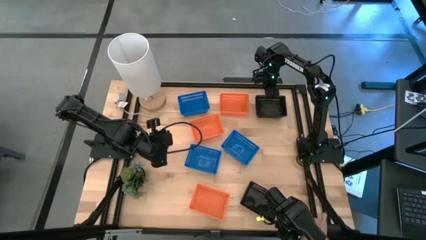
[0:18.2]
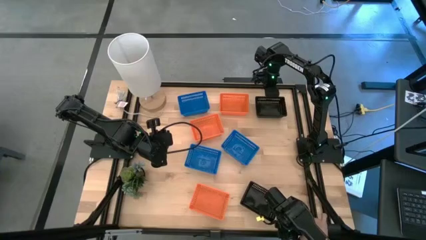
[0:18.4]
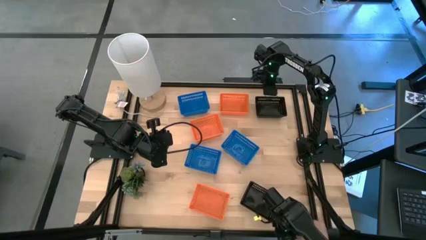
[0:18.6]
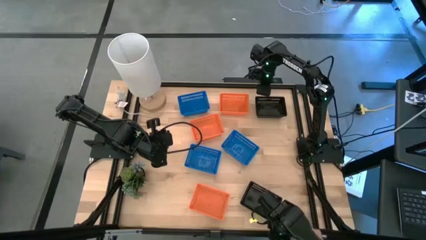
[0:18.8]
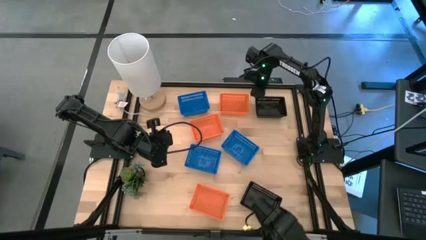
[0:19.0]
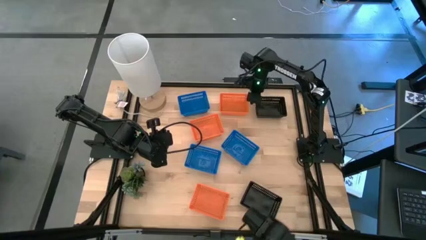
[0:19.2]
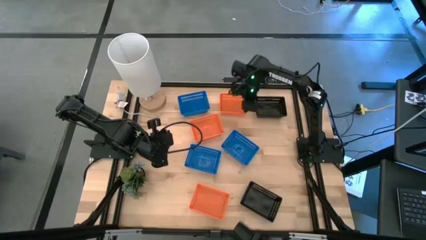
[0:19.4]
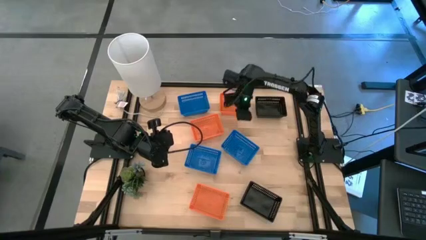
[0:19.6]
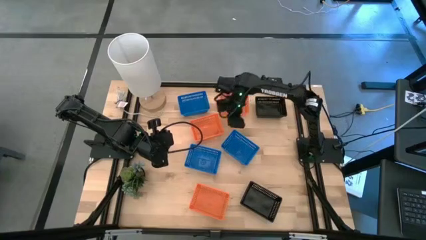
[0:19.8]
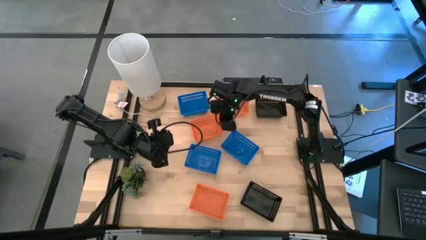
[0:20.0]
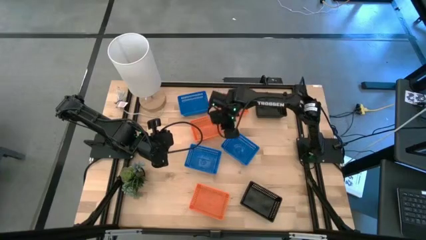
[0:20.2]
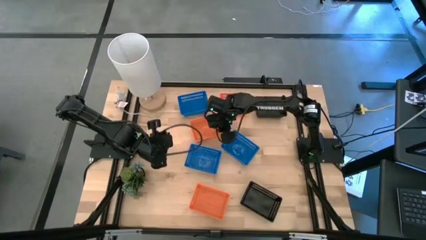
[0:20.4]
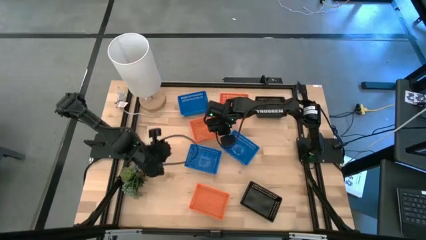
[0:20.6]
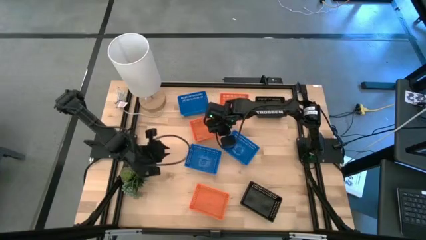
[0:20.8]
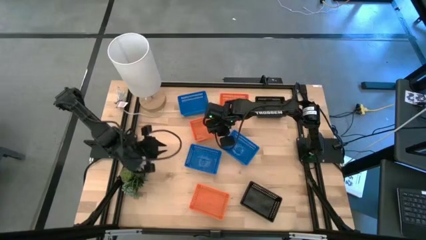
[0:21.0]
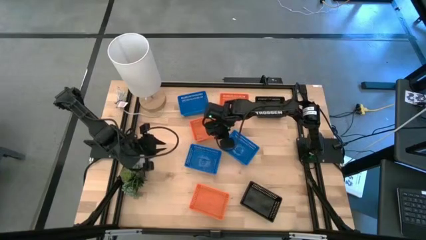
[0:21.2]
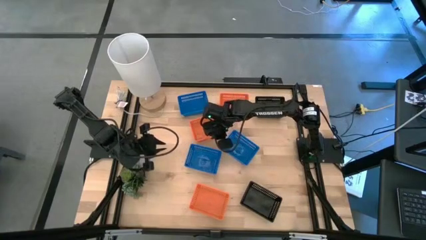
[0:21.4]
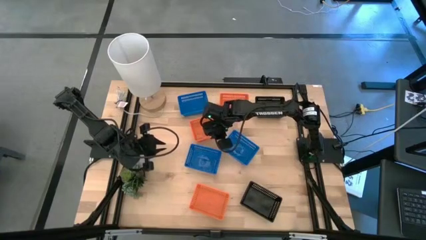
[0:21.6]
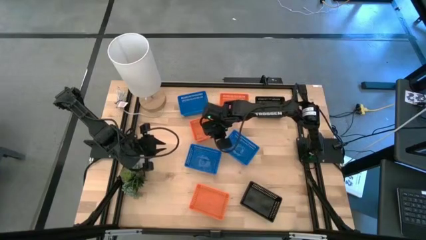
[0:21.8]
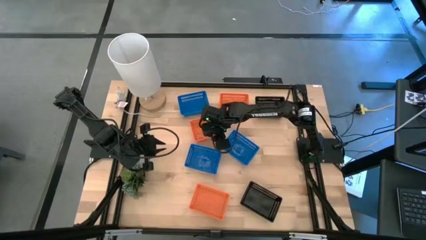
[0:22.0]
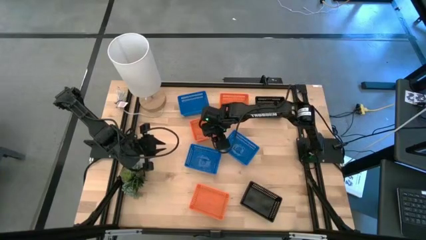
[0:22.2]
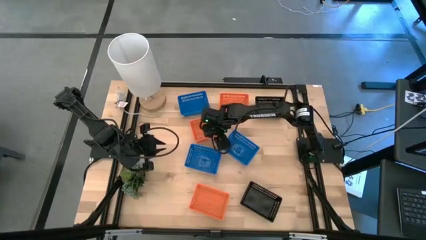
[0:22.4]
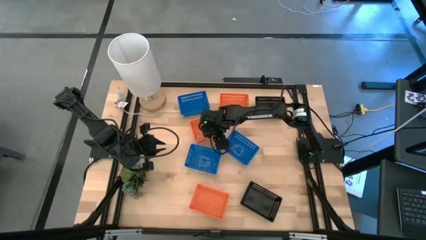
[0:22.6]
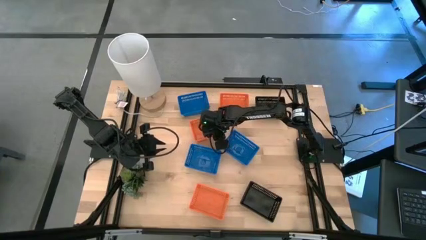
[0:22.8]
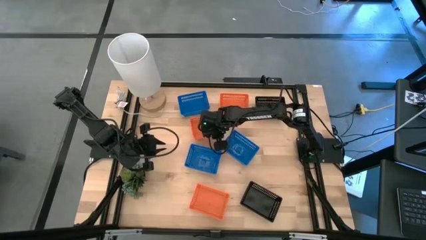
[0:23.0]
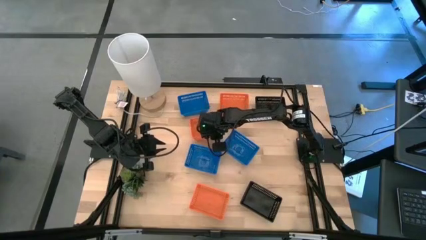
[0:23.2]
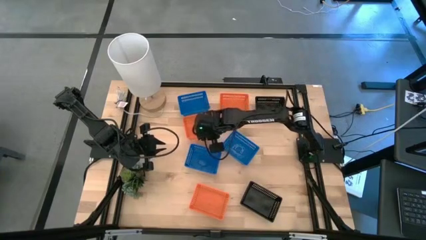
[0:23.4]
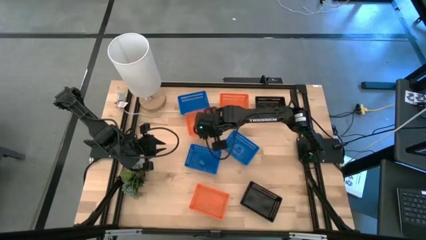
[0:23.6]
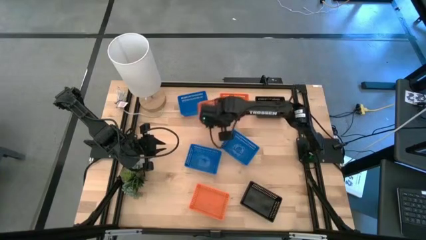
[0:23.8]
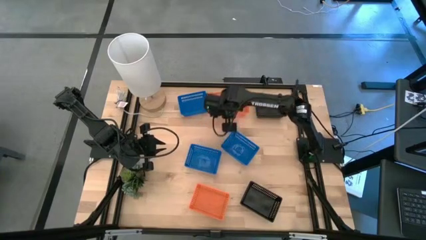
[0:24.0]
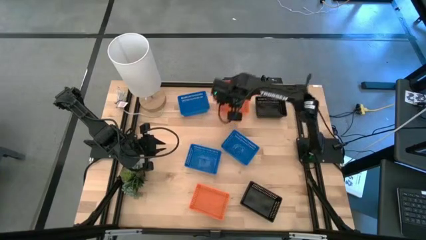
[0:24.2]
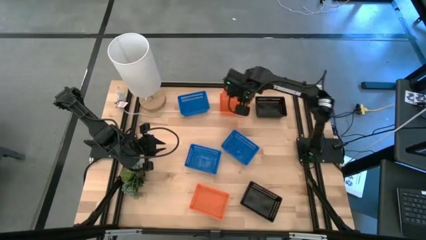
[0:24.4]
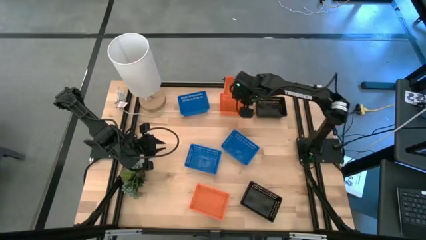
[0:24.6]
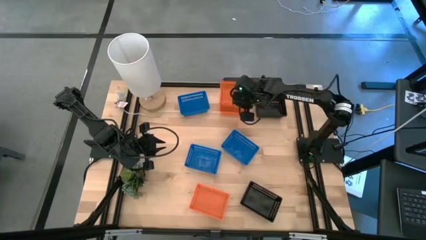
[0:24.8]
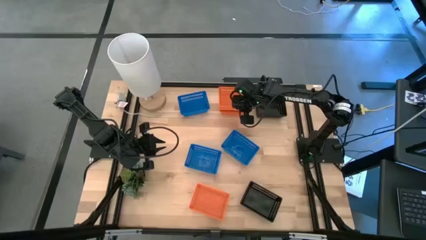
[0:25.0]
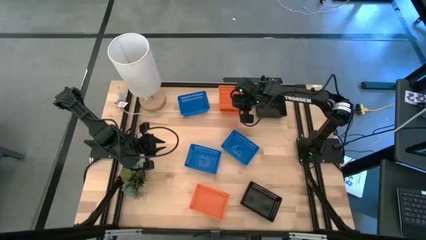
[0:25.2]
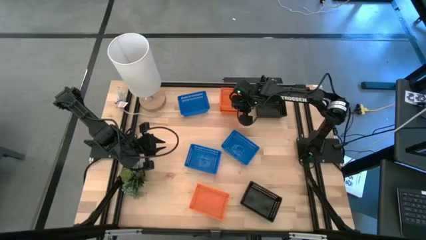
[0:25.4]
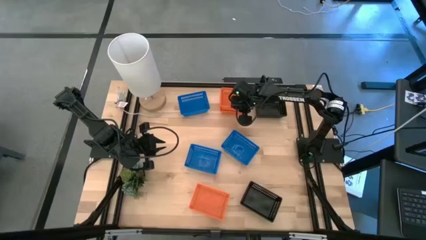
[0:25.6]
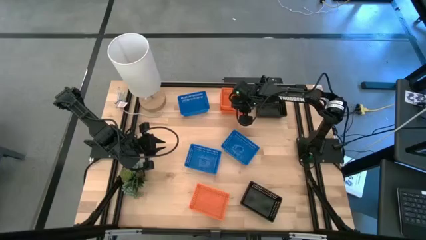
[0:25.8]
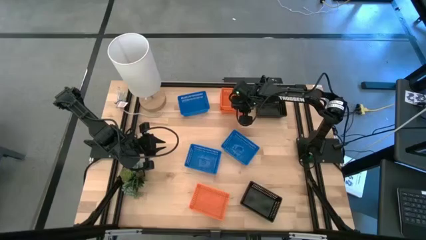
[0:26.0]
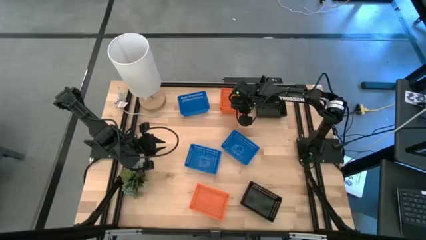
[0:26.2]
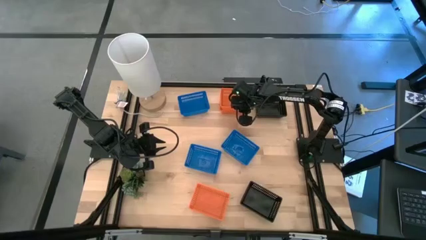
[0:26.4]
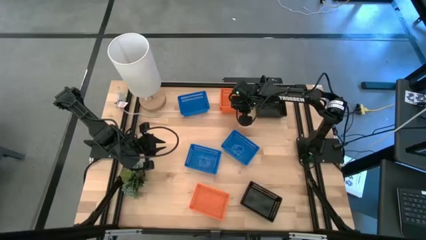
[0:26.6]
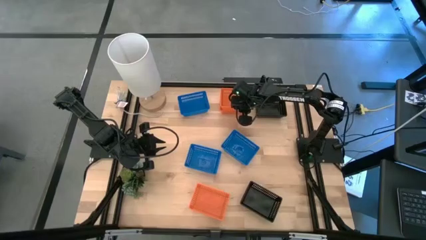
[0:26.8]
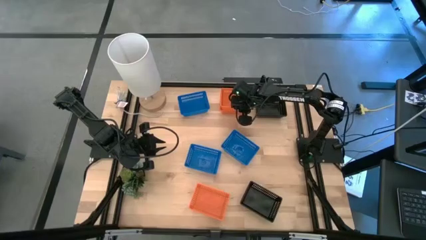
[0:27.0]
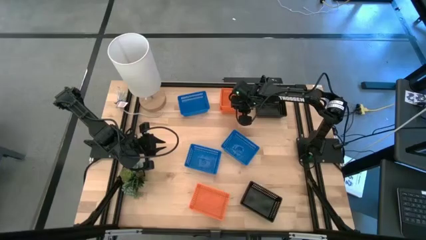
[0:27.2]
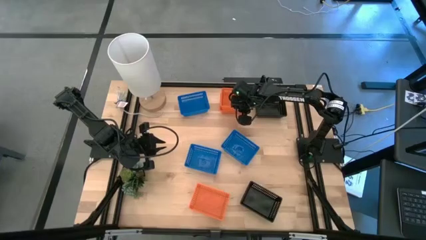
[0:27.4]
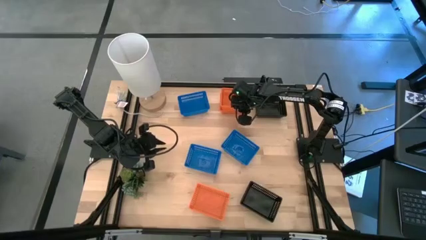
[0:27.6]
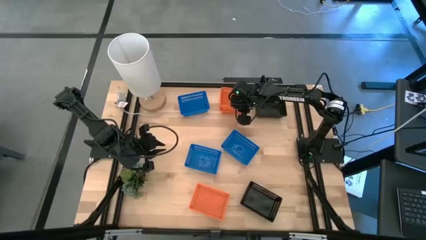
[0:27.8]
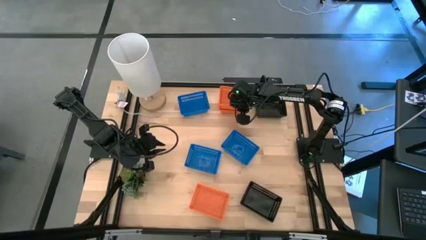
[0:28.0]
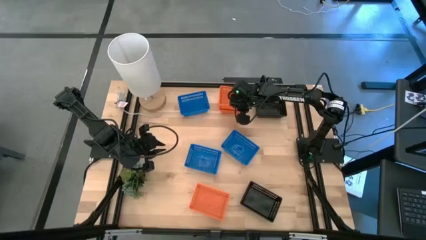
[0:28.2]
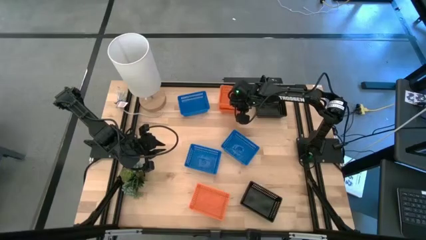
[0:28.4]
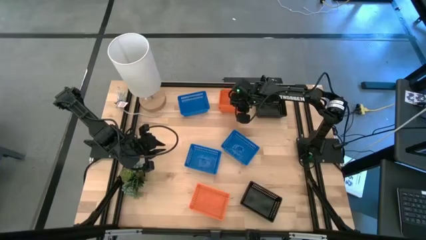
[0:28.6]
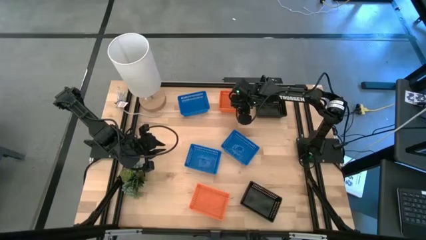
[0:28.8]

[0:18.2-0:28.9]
Stack the middle orange bin on top of the top orange bin

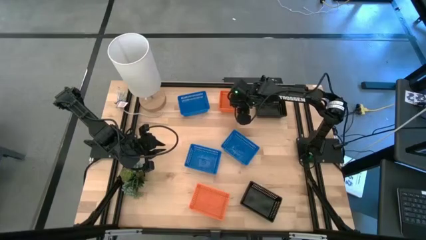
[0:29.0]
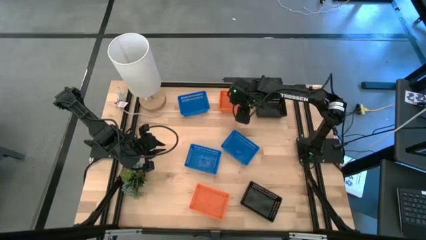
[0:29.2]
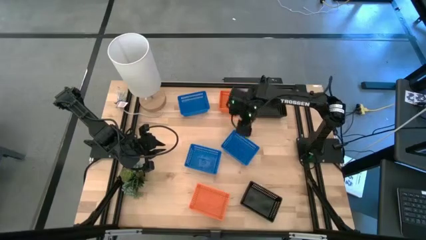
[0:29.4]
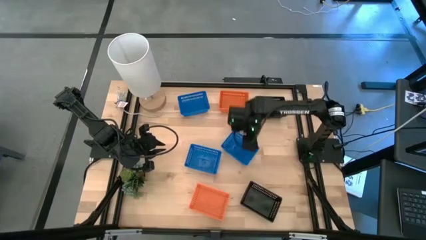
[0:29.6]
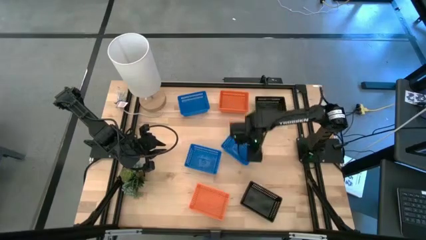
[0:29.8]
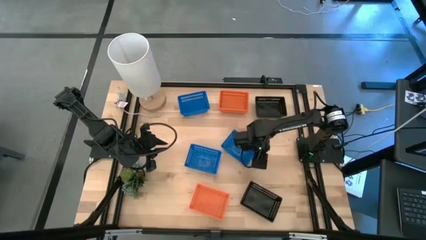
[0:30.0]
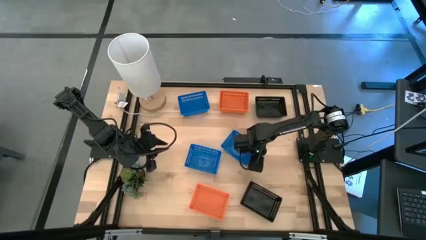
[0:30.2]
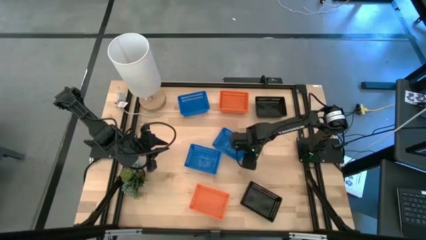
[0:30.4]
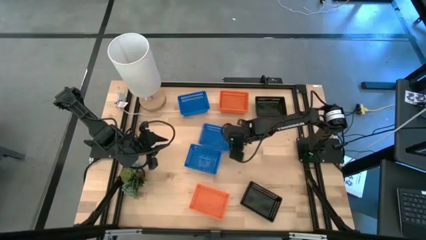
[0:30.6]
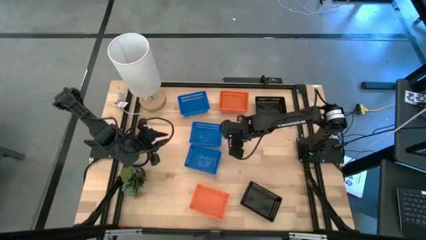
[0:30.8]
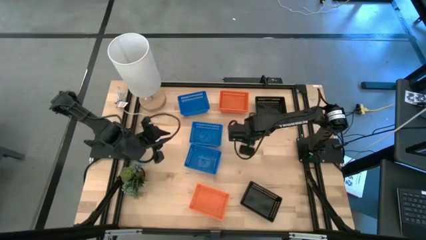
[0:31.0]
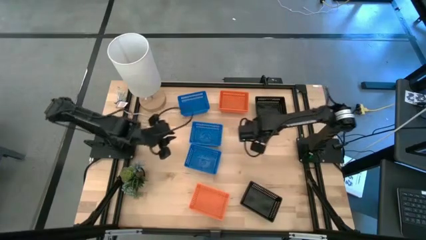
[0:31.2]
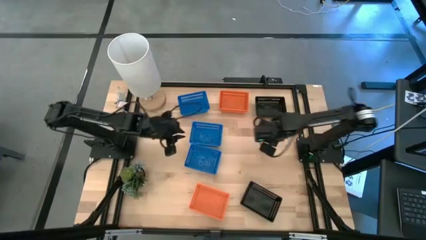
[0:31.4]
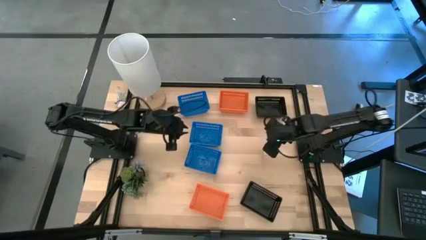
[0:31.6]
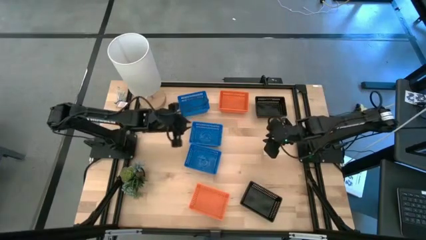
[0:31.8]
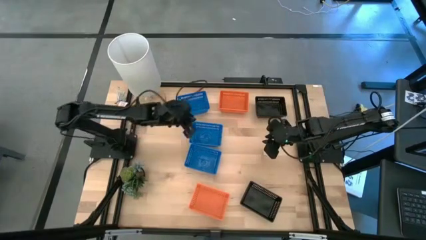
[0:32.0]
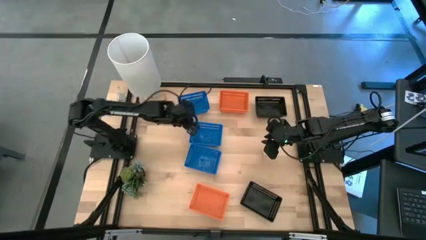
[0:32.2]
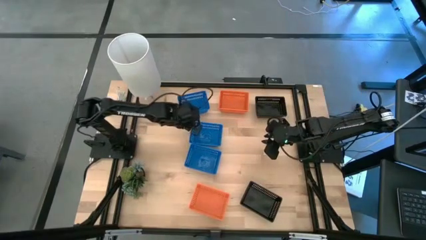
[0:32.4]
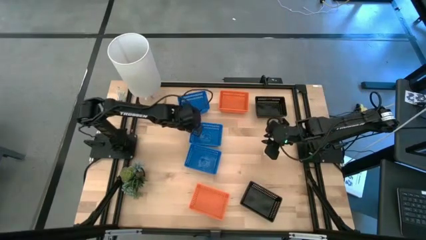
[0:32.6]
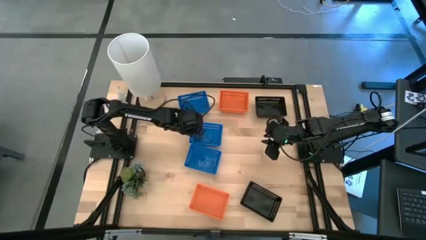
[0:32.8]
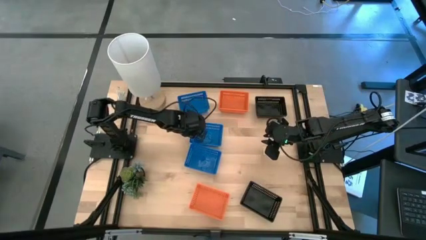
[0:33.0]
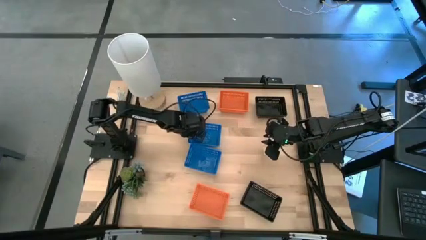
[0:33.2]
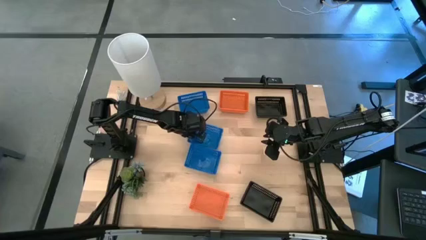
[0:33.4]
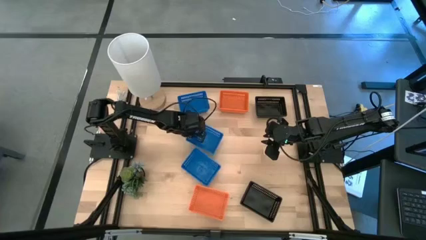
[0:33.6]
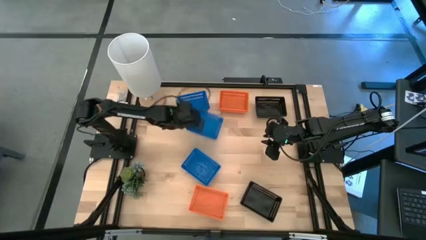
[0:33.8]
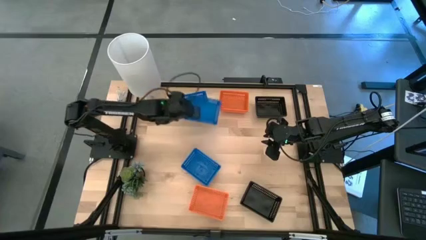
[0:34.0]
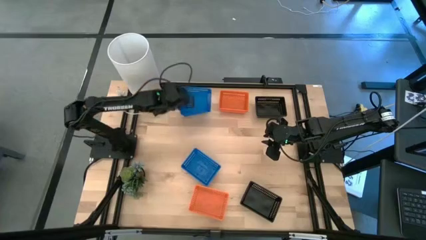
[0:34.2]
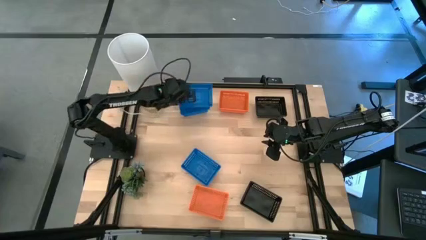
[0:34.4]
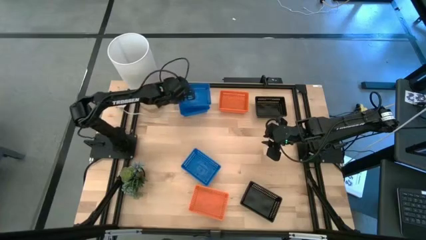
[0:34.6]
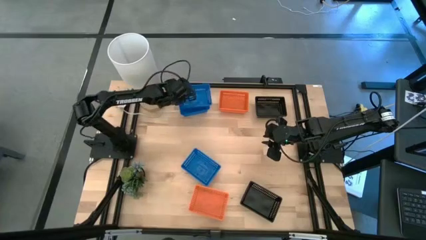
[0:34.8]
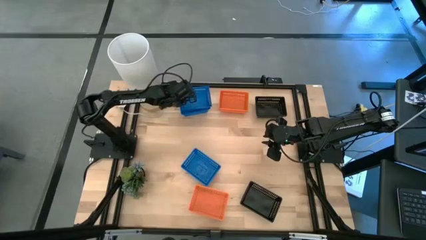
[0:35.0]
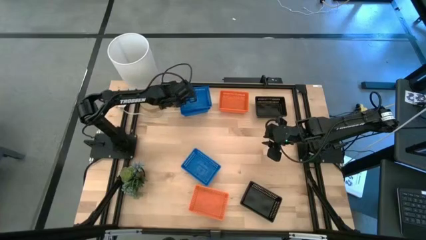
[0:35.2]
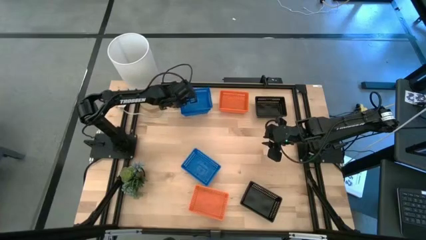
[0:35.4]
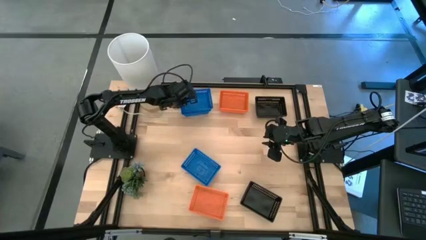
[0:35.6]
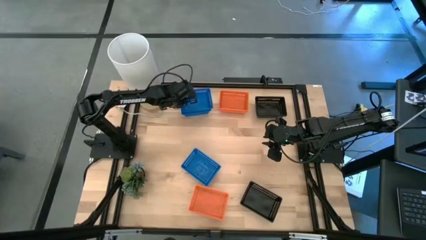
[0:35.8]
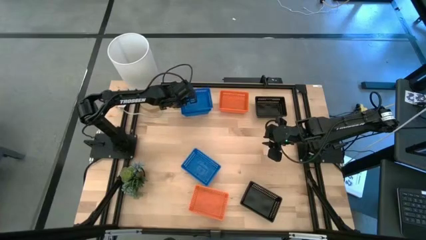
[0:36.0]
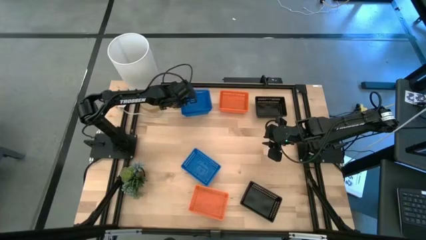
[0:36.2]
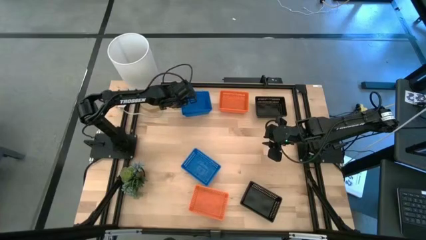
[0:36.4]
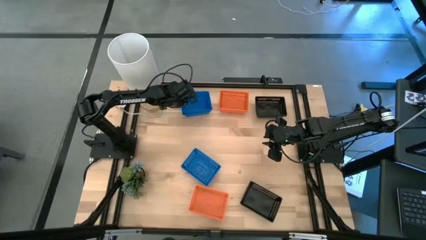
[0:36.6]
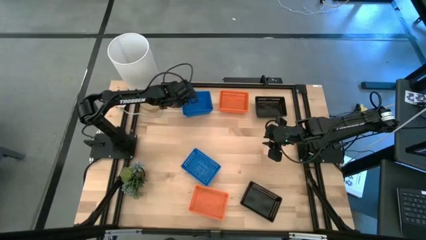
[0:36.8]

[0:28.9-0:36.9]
Stack the right blue bin on top of the top blue bin
